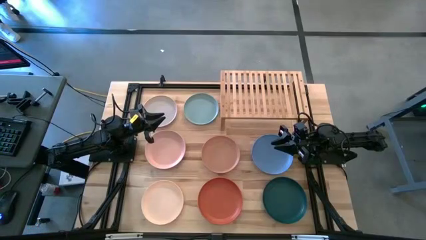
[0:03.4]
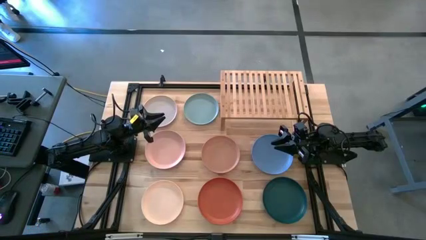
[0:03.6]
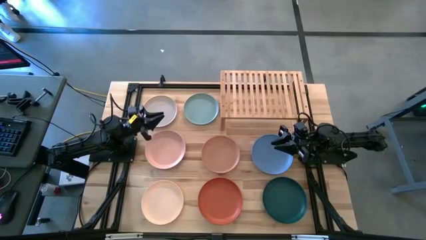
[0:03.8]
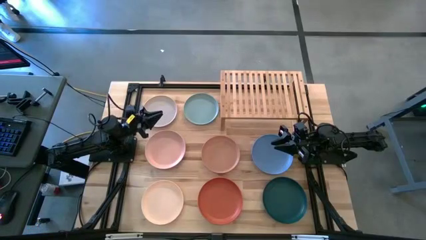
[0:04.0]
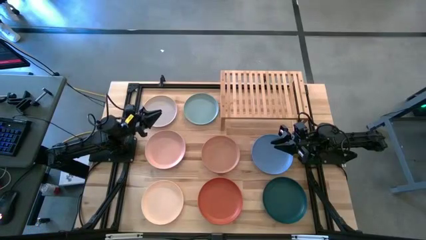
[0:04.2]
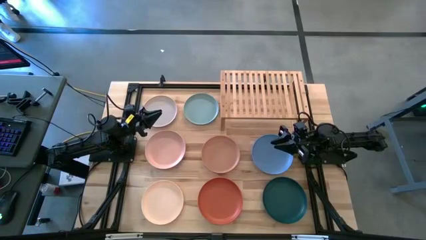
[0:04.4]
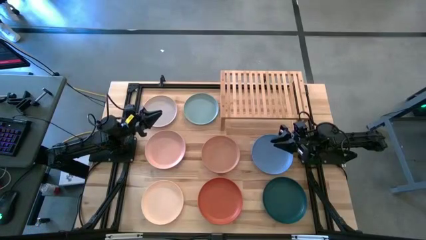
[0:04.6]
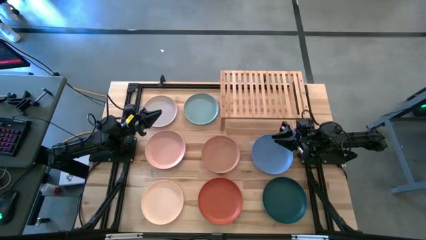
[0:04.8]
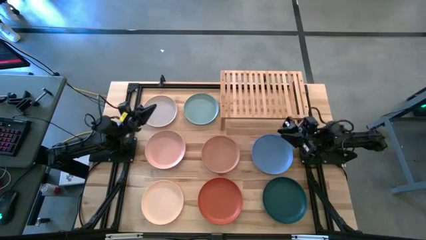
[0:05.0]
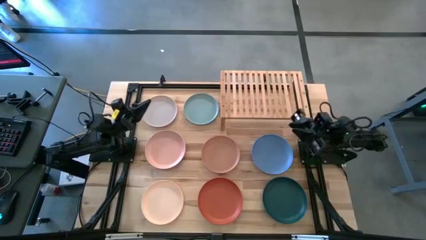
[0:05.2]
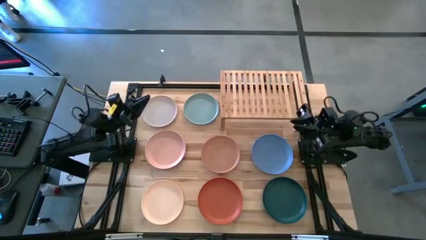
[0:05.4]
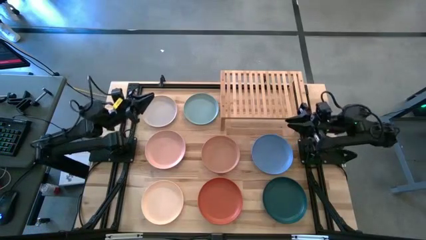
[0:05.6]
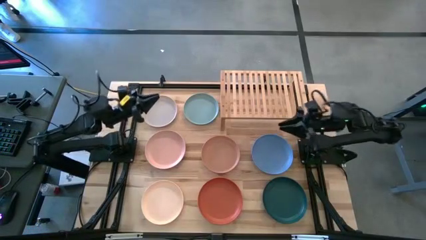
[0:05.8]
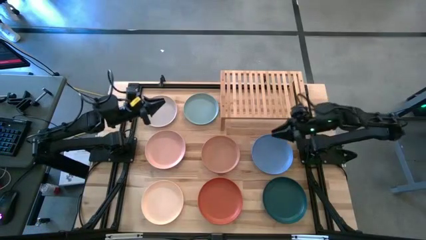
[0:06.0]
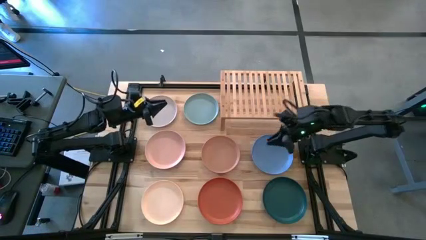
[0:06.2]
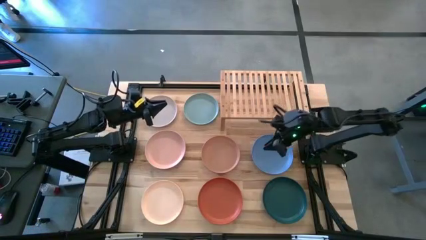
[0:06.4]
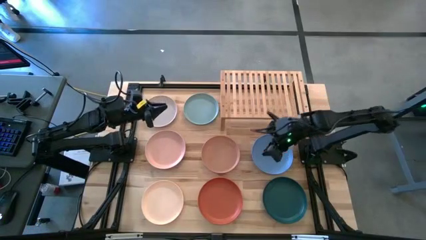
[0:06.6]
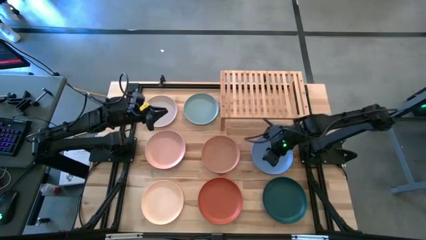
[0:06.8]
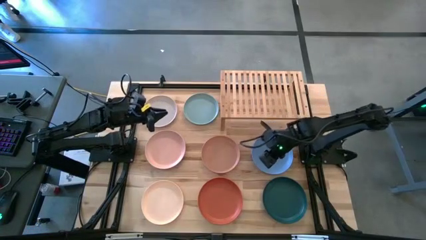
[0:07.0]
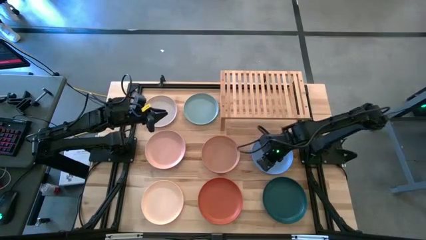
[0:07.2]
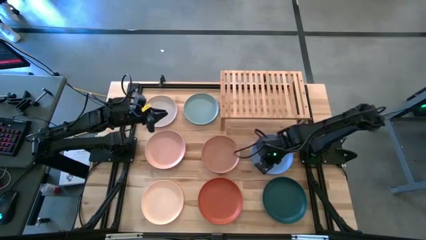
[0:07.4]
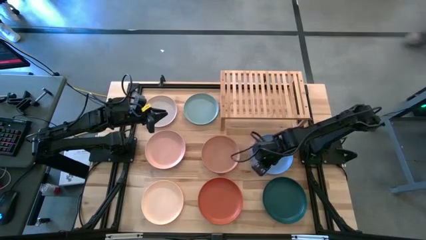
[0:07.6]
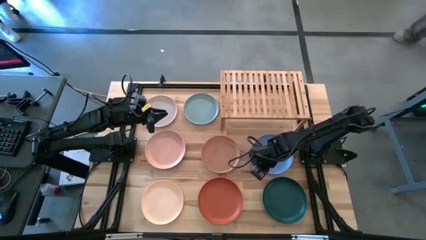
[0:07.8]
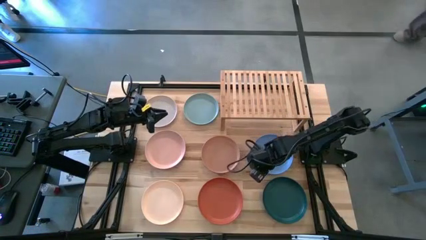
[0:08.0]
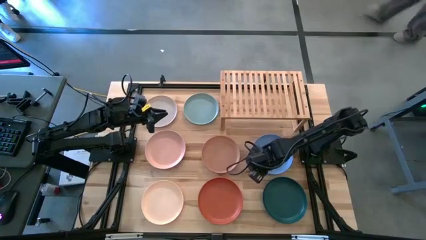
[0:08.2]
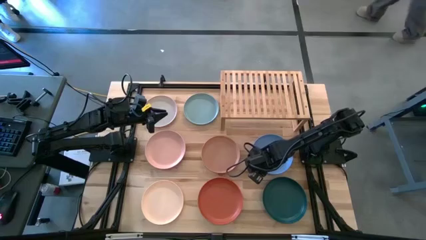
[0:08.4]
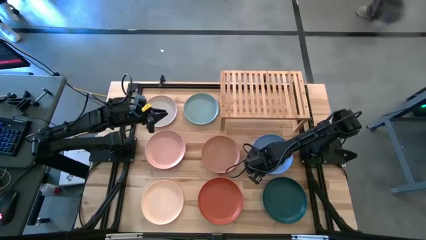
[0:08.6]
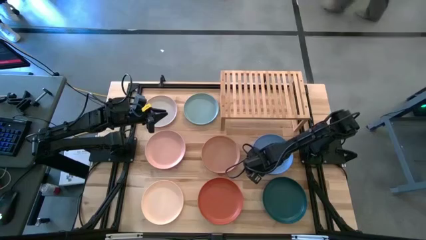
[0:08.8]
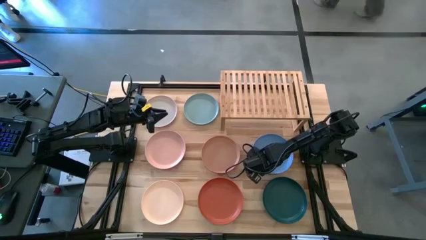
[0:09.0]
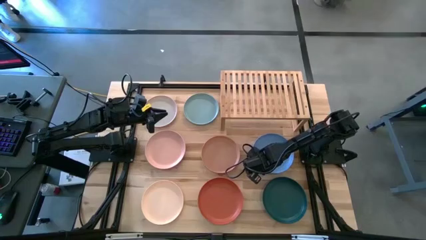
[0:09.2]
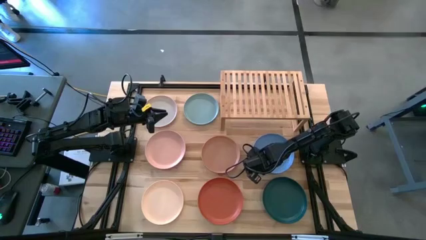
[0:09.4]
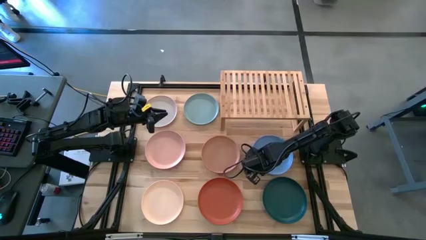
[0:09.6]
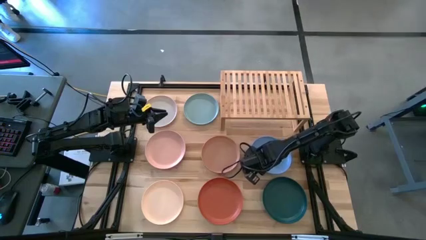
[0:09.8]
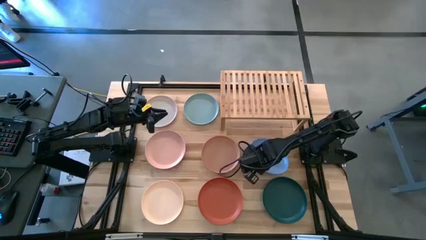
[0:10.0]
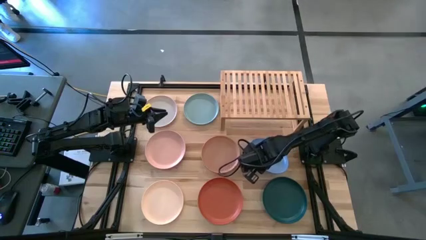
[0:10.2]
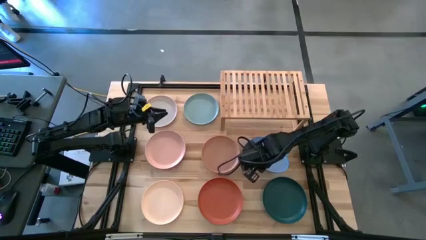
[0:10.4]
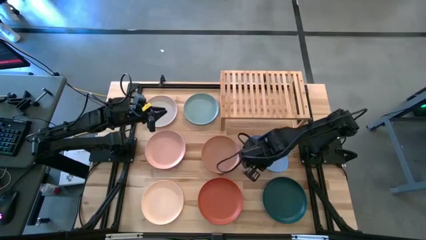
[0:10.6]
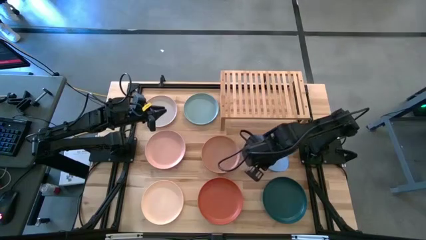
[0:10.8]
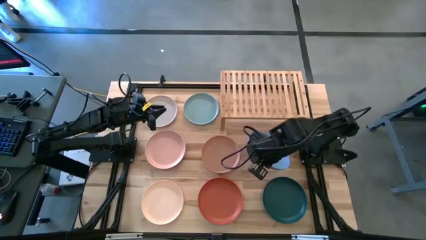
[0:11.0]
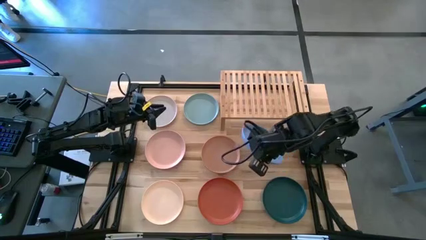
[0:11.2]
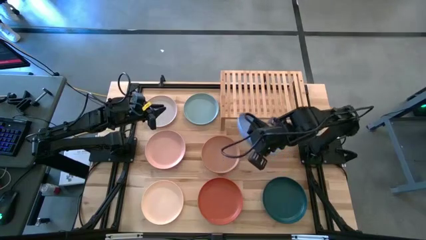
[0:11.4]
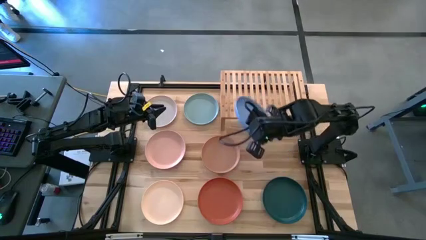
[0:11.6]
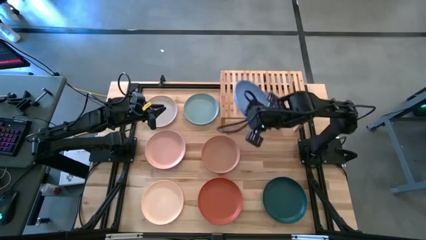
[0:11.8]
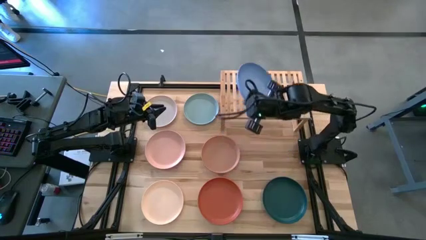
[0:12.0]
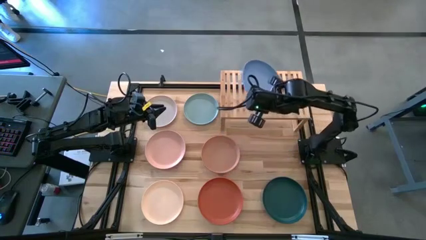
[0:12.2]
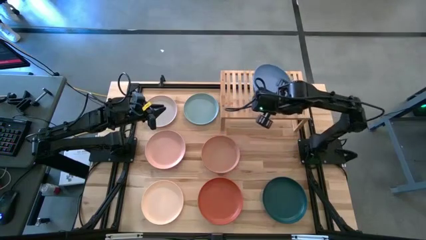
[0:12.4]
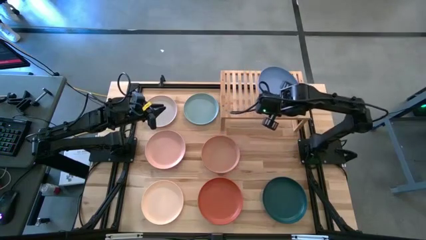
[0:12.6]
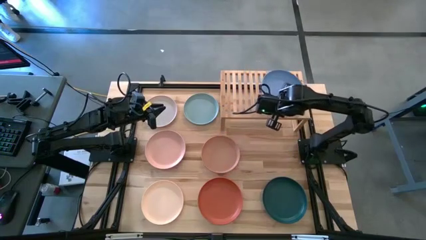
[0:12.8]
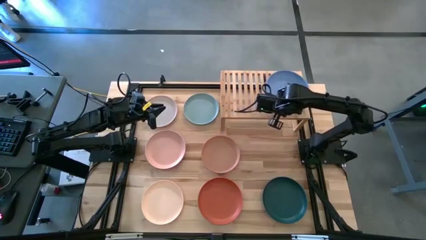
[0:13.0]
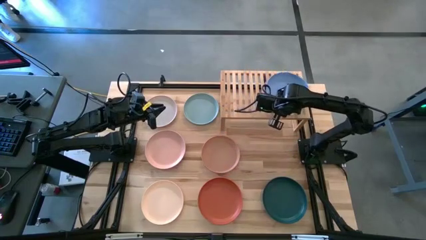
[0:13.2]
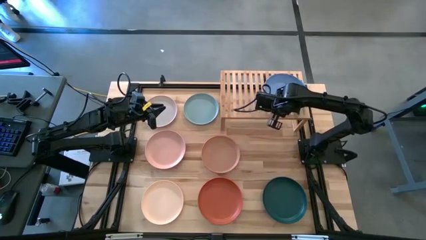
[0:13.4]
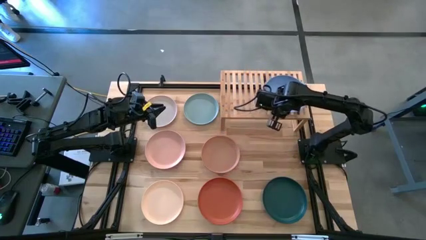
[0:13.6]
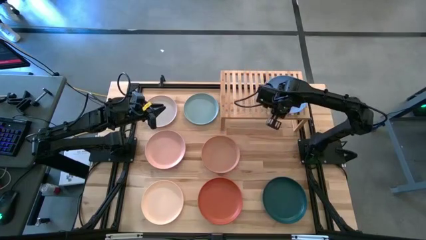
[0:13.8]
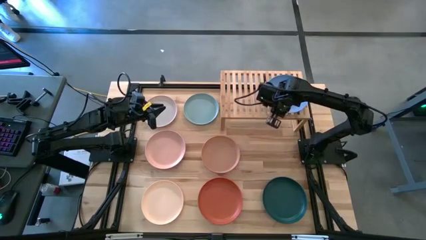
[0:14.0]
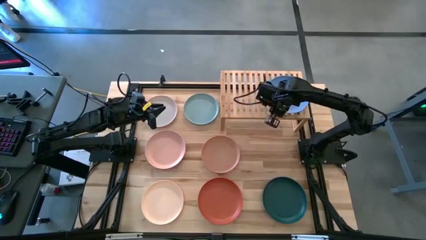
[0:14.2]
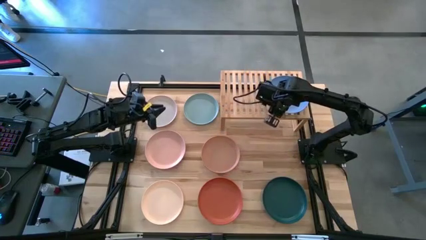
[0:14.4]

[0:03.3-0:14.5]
Task: Place and stack plates onto a shelf
Put the blue plate on the shelf
